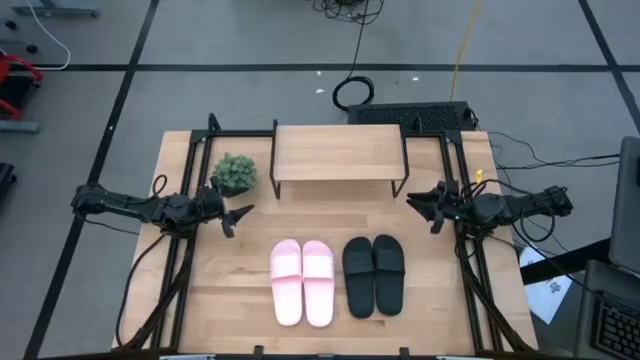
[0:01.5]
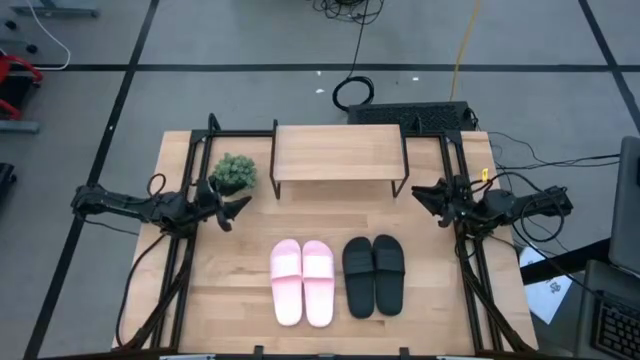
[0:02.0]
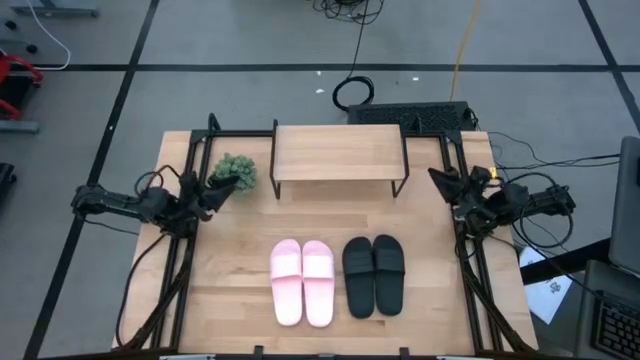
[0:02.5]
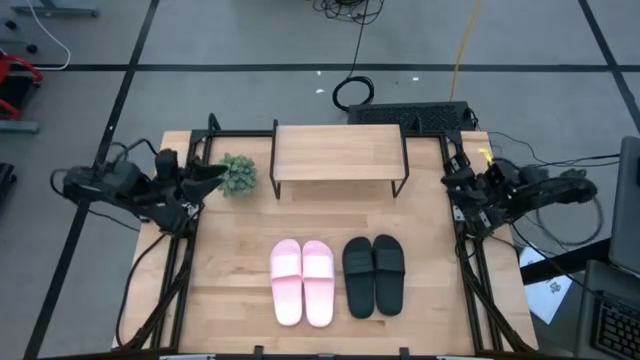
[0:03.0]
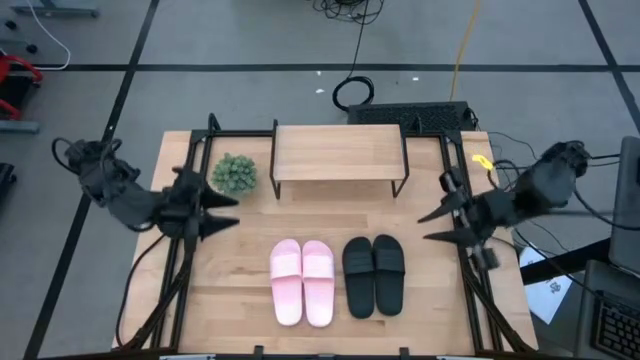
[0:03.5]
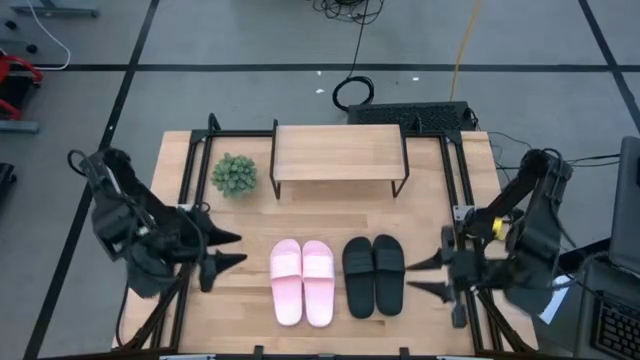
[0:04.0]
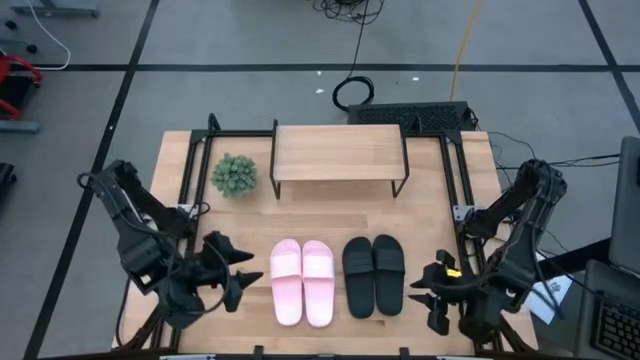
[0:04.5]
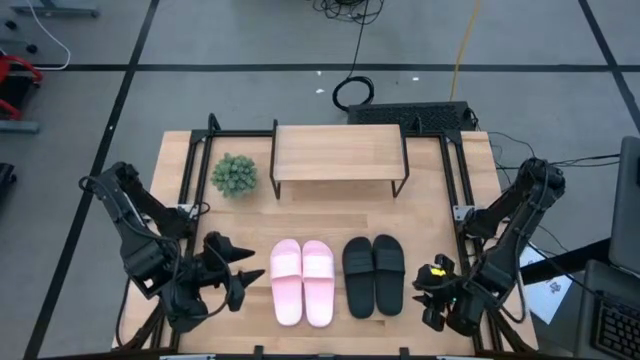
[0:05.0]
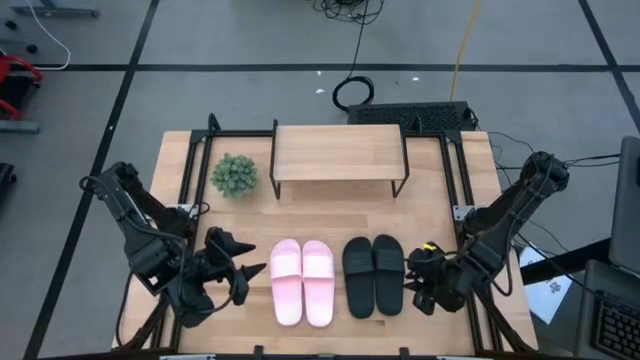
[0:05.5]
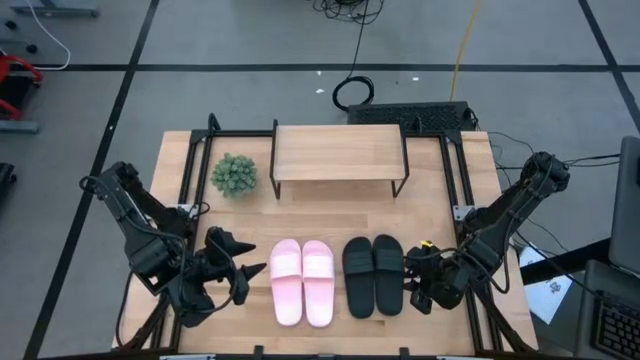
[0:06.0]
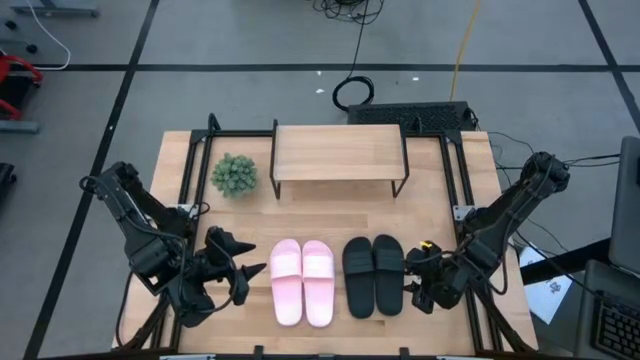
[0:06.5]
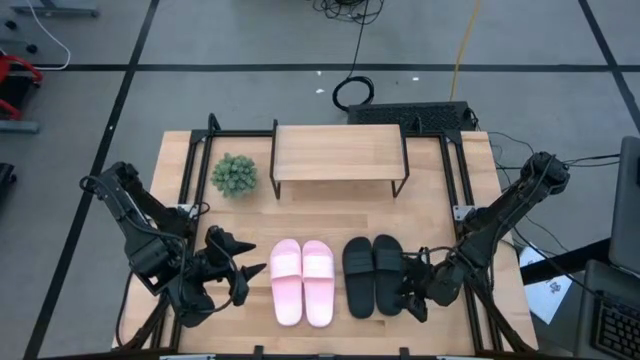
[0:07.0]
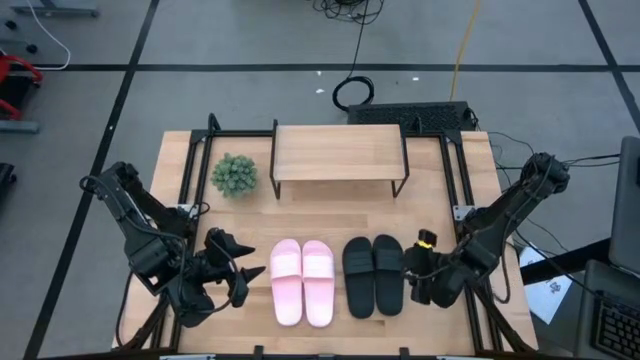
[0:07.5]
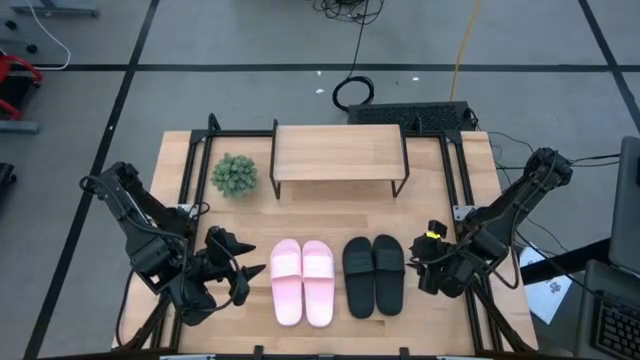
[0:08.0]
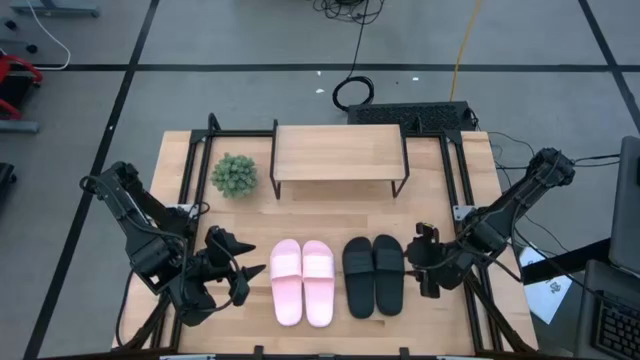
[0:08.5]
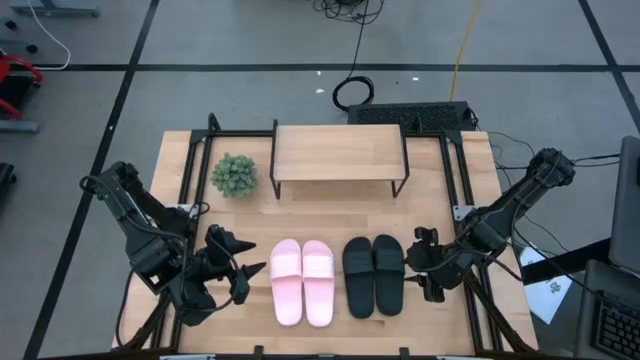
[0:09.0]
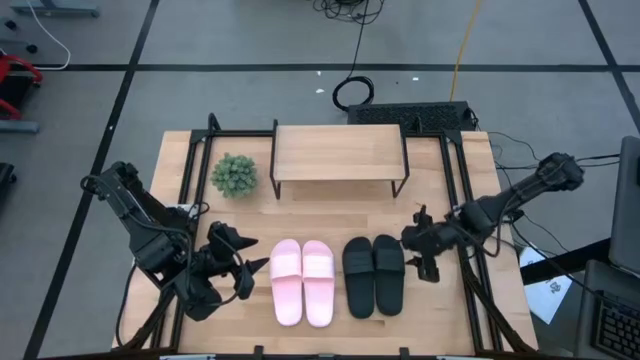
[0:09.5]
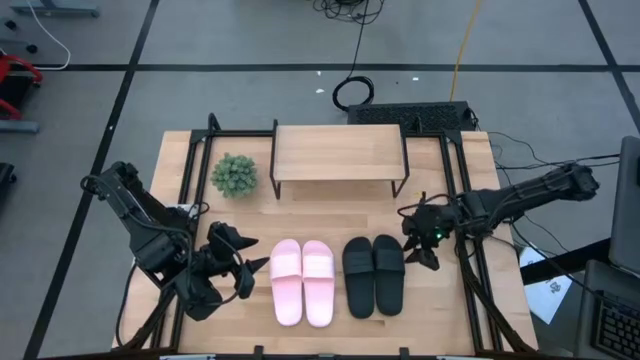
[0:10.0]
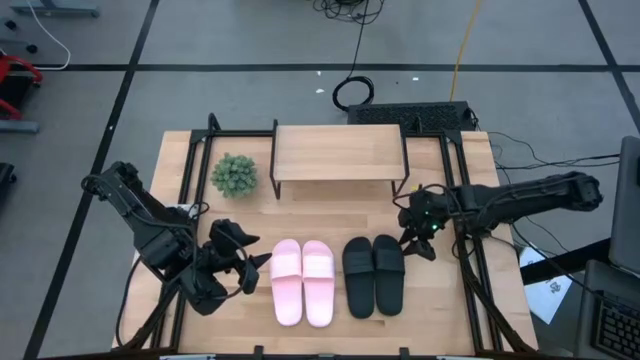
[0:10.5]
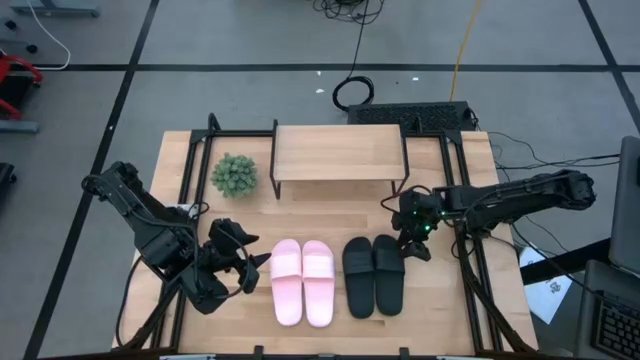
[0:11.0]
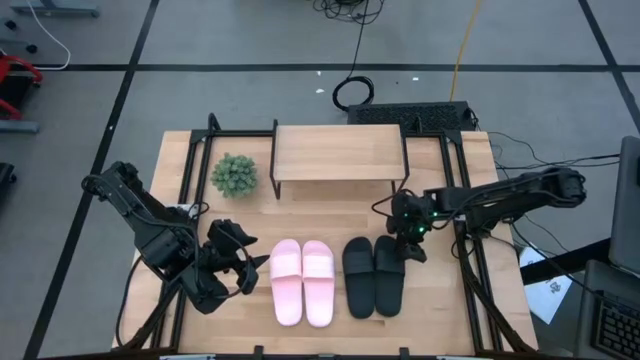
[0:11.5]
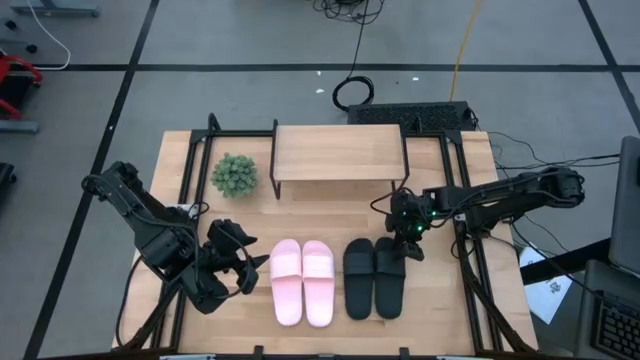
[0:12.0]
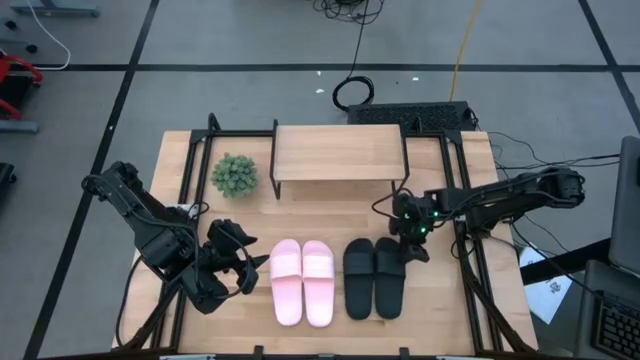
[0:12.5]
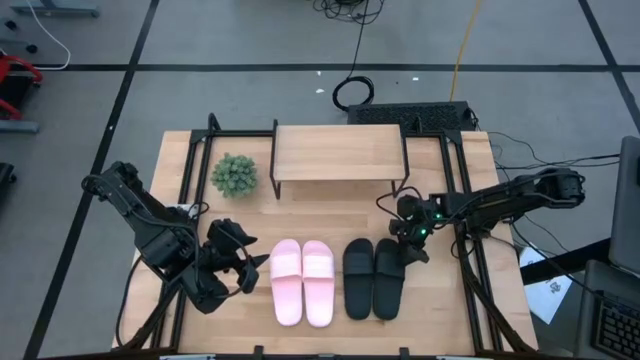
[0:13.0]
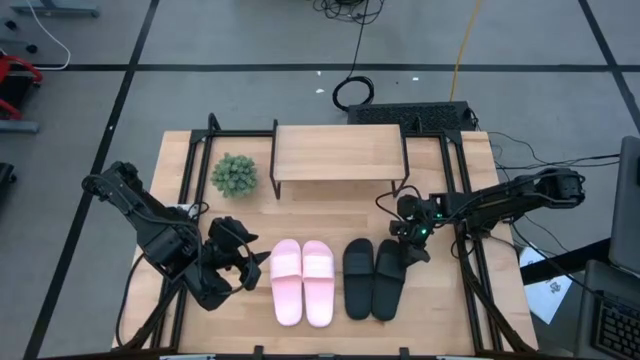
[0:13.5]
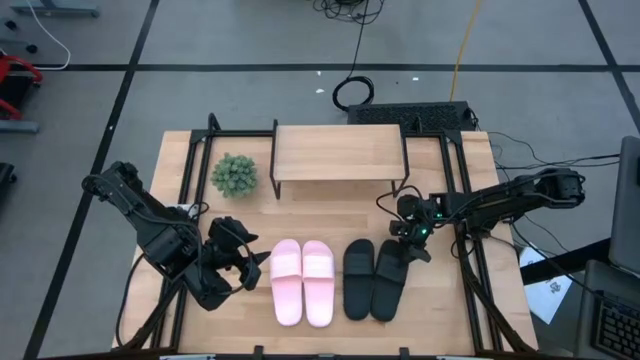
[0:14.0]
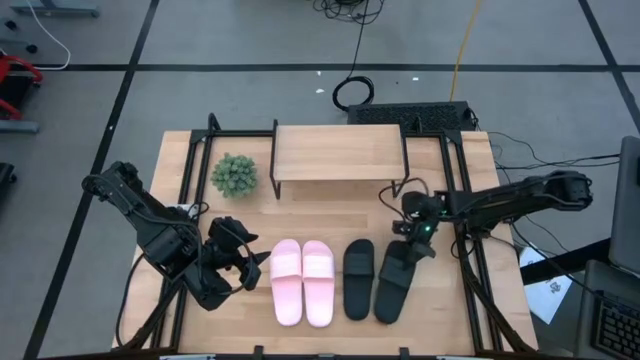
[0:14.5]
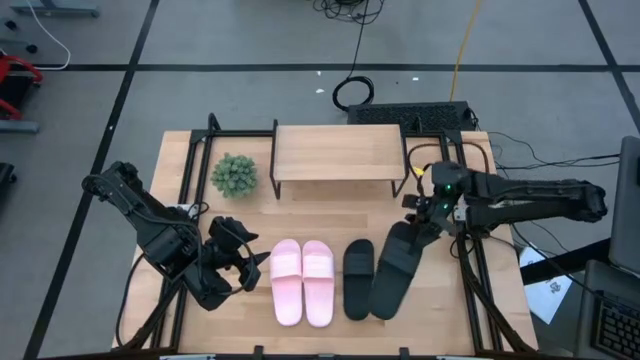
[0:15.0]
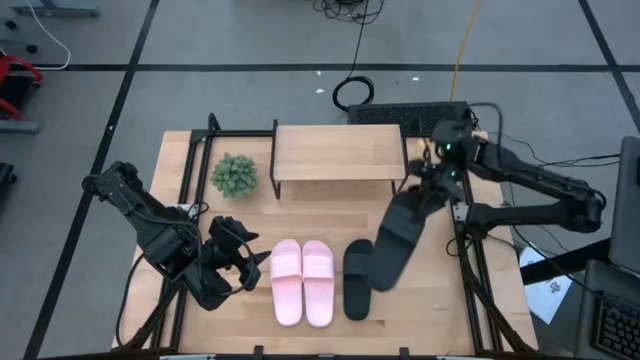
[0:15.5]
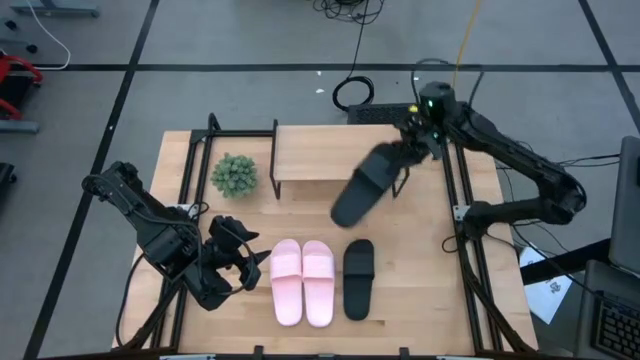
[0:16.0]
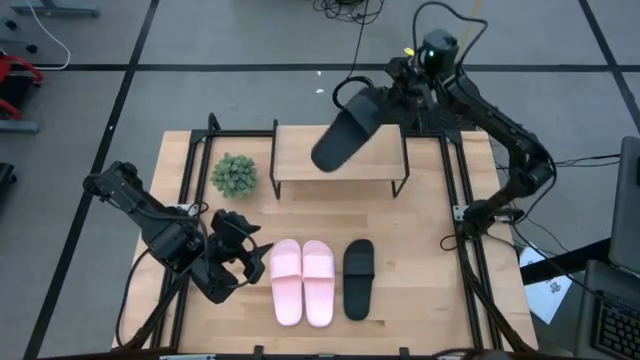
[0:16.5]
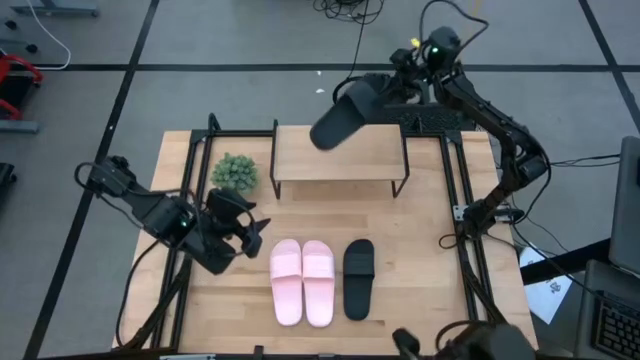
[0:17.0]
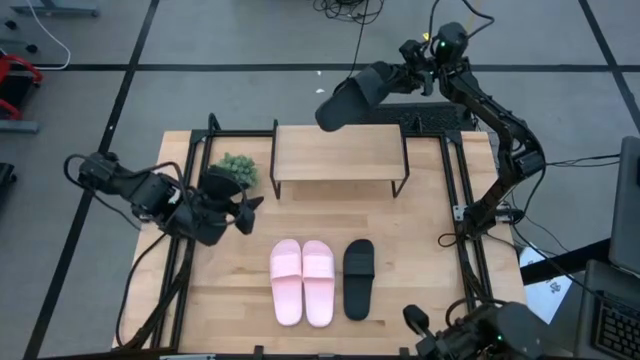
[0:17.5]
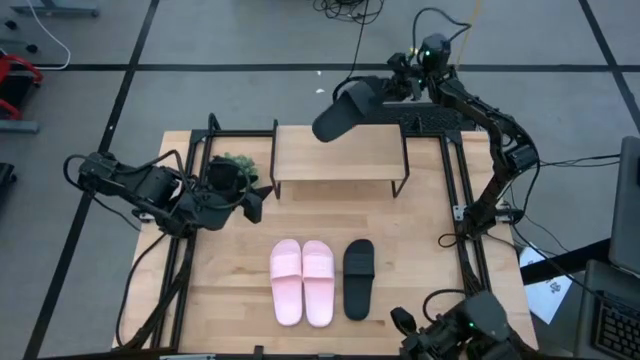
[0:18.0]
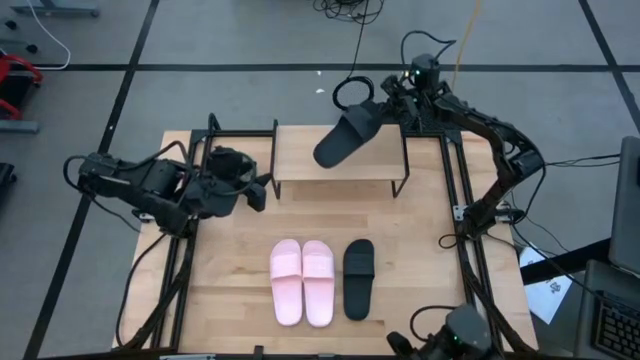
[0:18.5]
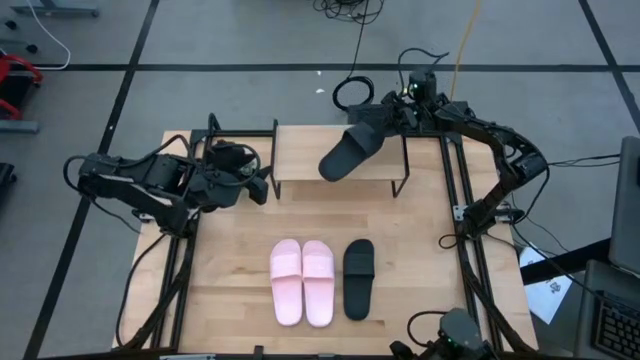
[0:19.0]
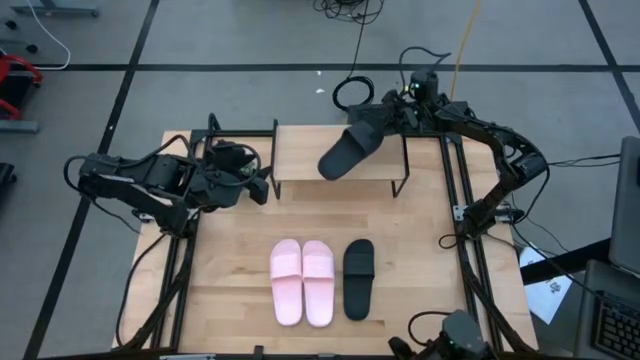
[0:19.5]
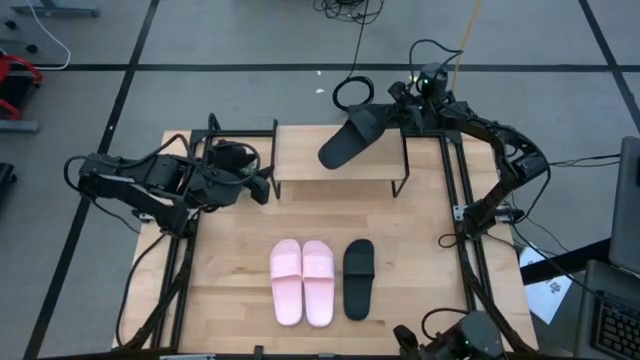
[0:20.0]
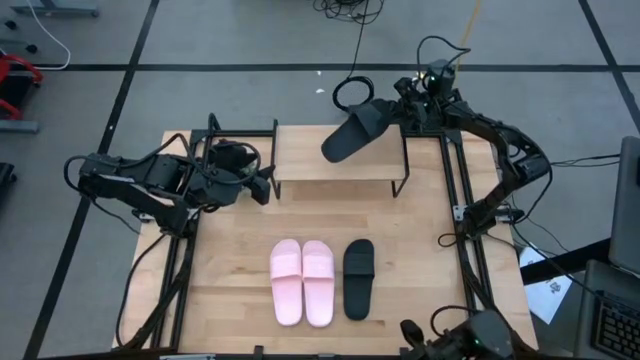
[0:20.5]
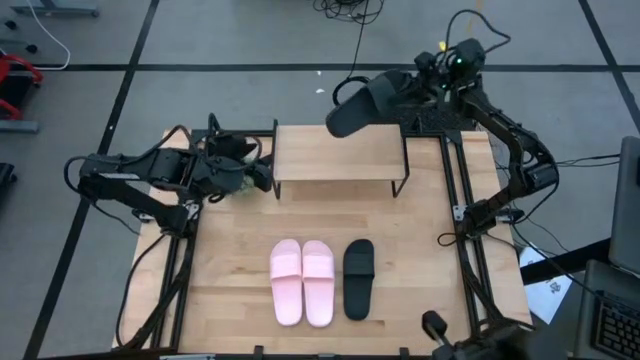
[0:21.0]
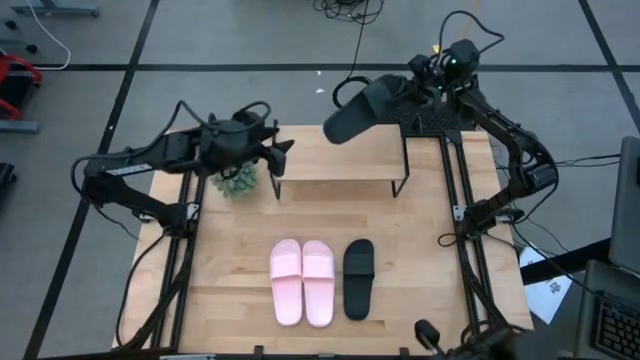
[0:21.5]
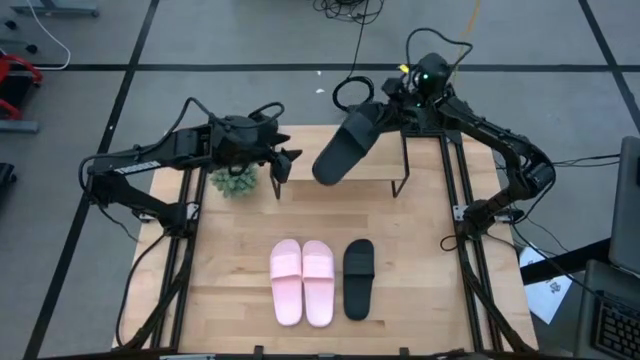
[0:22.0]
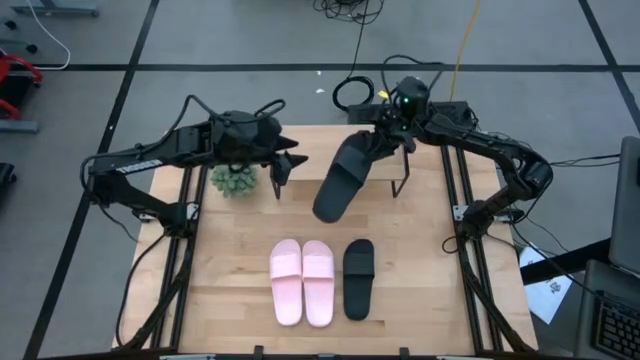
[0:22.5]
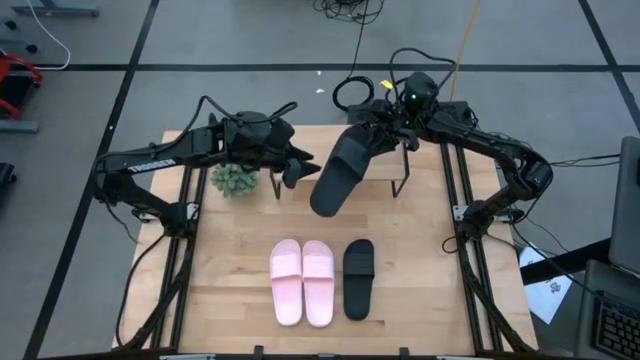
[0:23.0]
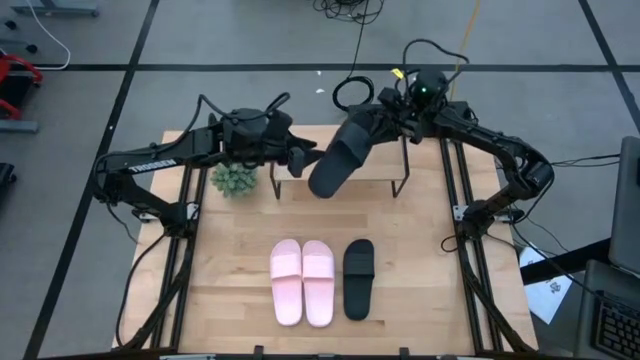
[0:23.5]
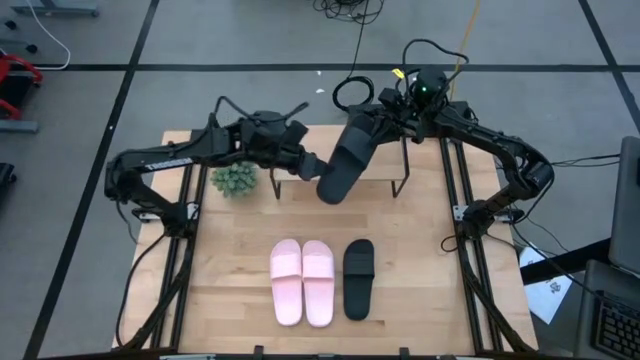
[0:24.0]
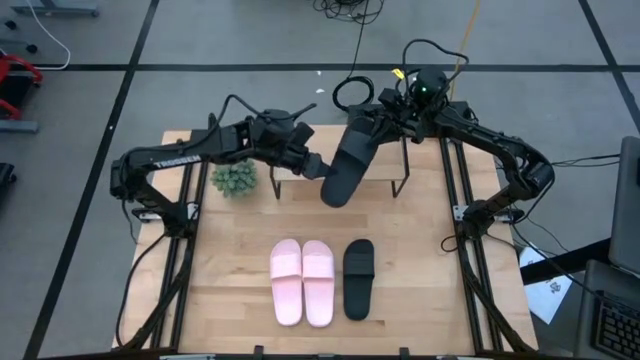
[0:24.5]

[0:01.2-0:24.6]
Task: Pick and place slides into the shelf
Put the right black slipper on the shelf
